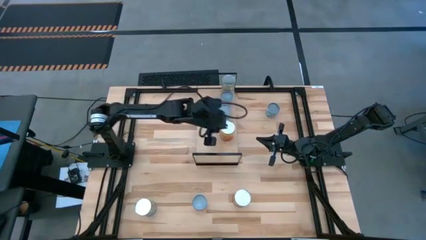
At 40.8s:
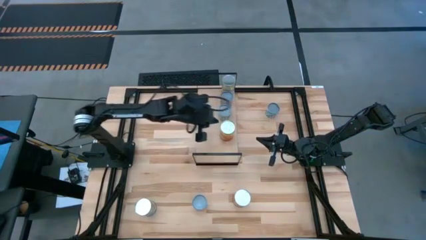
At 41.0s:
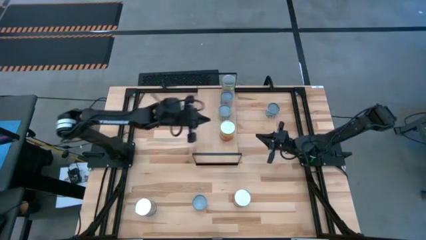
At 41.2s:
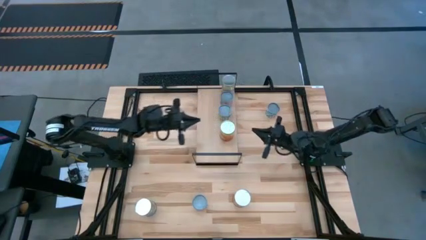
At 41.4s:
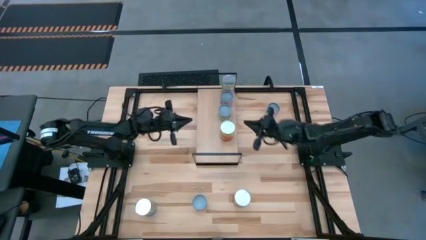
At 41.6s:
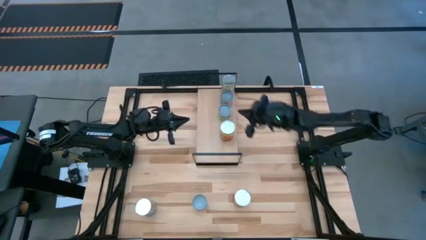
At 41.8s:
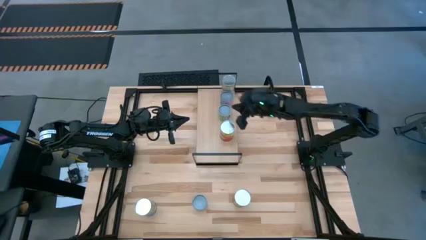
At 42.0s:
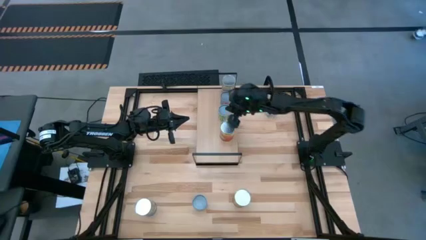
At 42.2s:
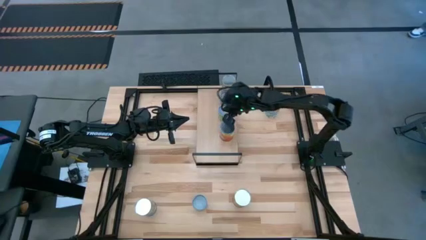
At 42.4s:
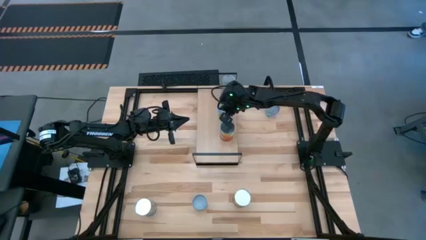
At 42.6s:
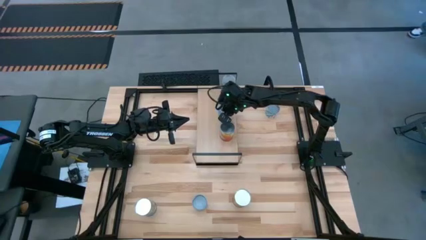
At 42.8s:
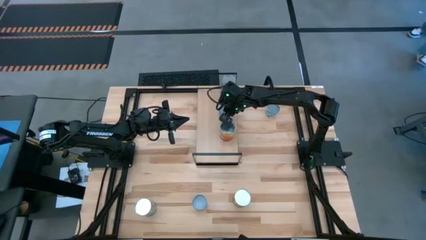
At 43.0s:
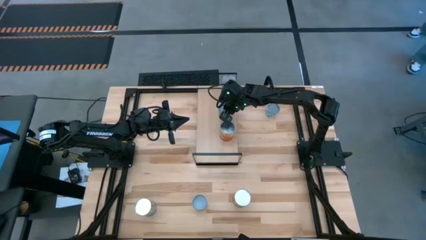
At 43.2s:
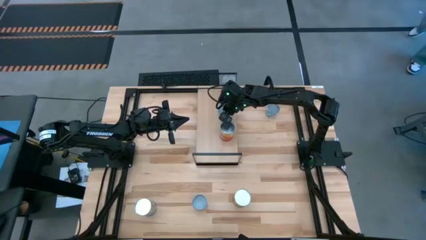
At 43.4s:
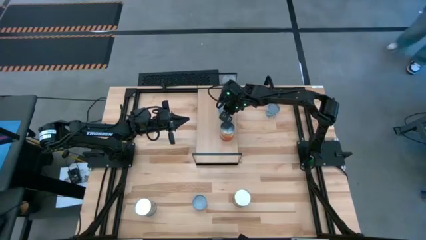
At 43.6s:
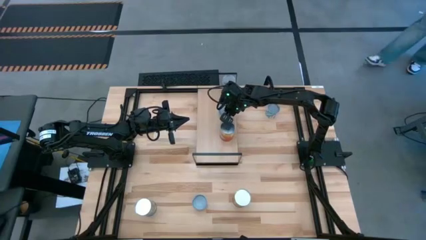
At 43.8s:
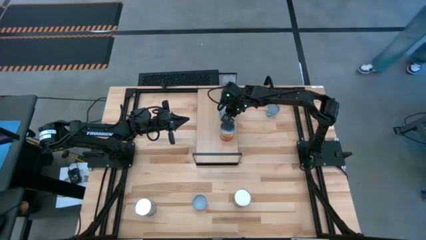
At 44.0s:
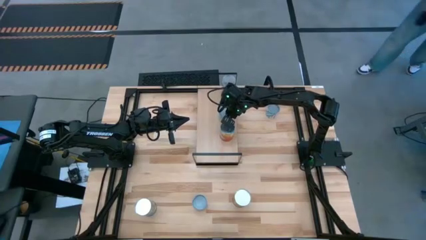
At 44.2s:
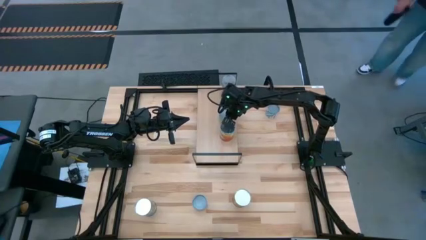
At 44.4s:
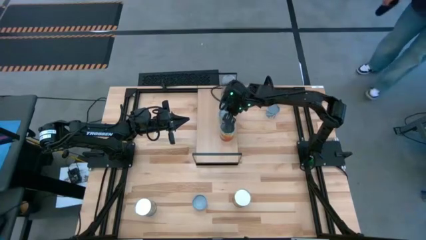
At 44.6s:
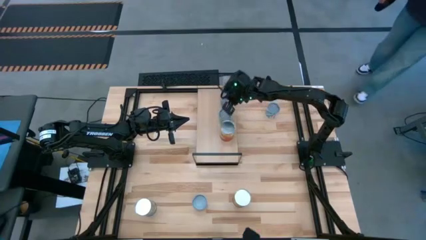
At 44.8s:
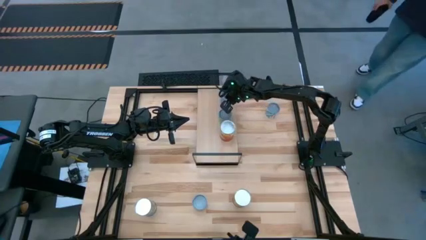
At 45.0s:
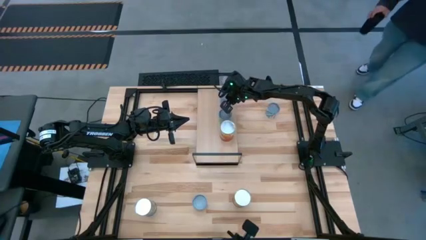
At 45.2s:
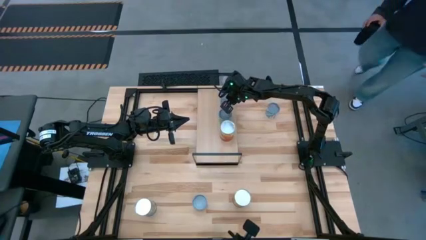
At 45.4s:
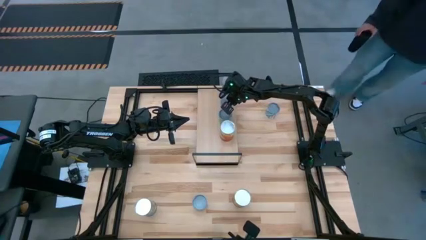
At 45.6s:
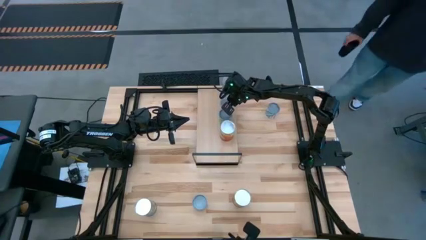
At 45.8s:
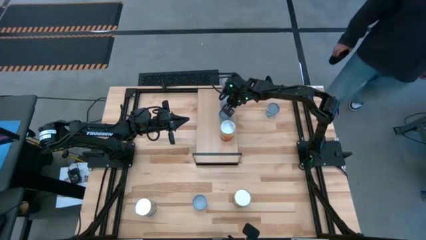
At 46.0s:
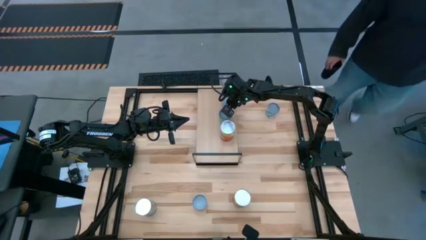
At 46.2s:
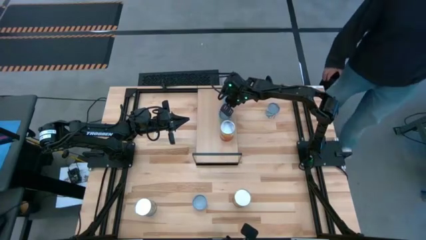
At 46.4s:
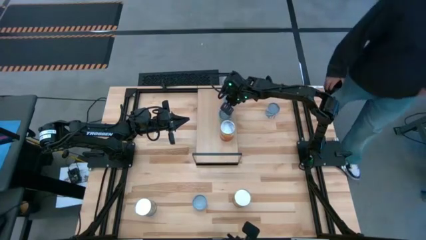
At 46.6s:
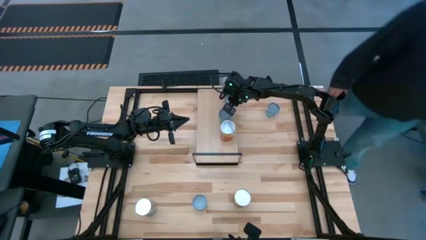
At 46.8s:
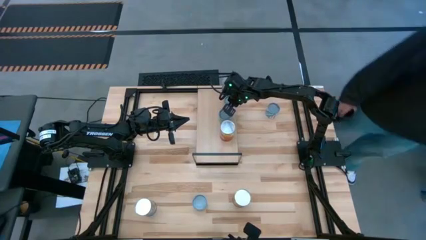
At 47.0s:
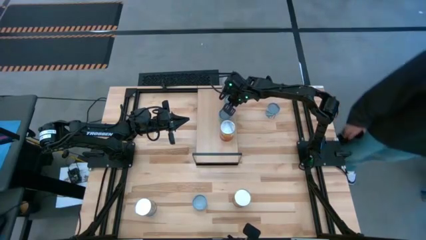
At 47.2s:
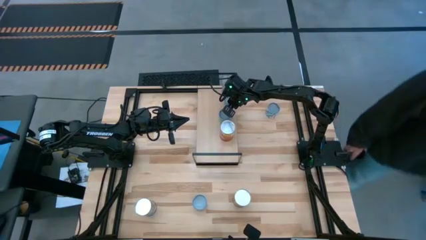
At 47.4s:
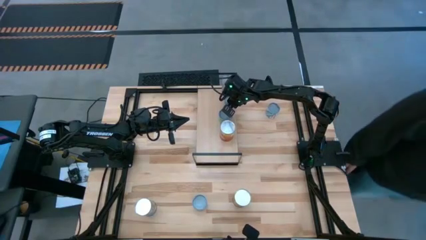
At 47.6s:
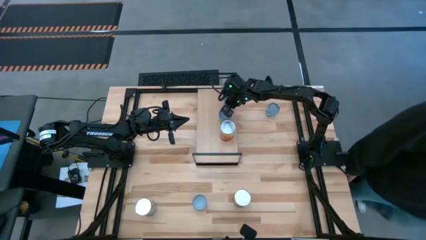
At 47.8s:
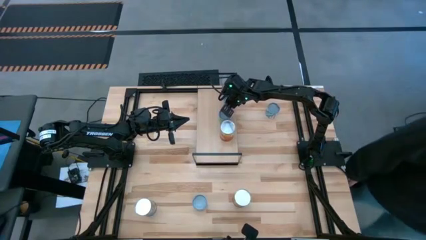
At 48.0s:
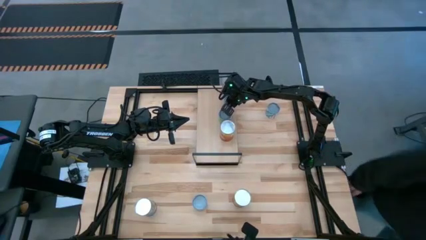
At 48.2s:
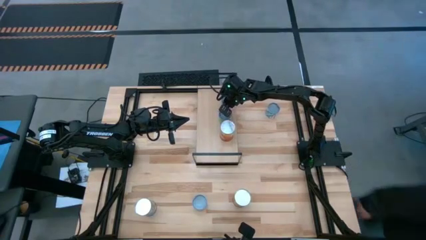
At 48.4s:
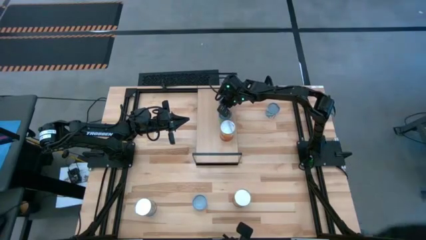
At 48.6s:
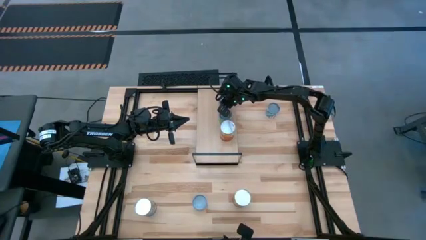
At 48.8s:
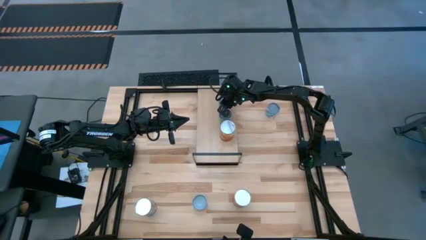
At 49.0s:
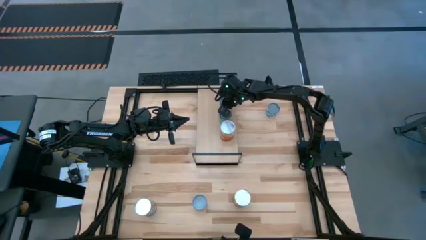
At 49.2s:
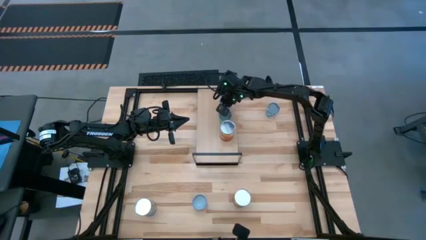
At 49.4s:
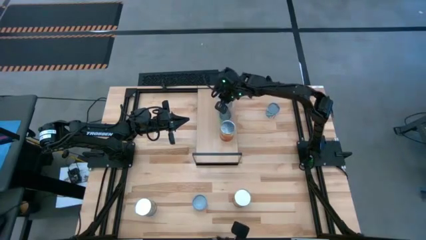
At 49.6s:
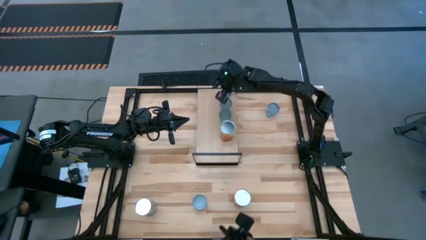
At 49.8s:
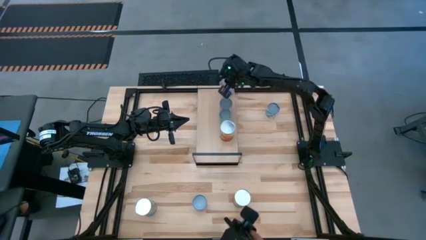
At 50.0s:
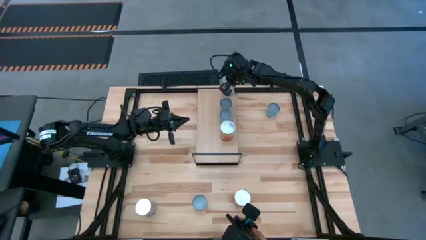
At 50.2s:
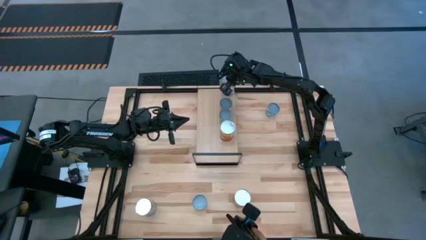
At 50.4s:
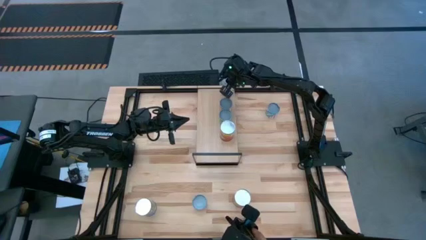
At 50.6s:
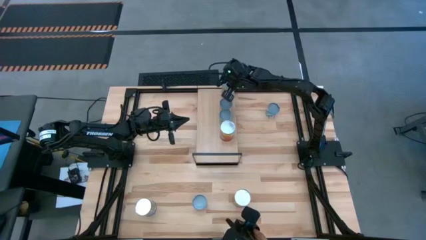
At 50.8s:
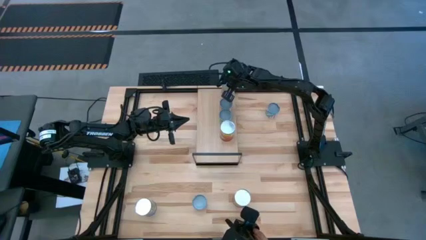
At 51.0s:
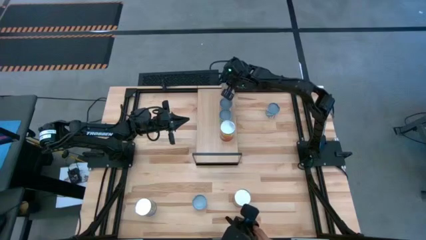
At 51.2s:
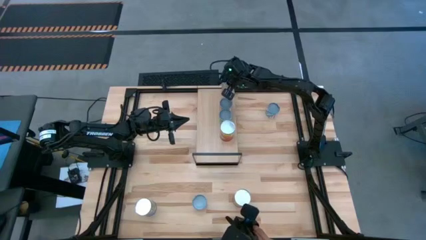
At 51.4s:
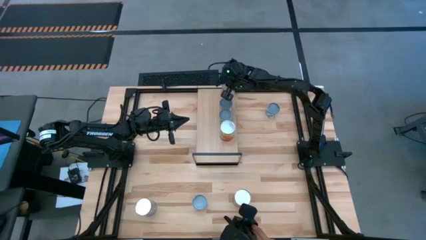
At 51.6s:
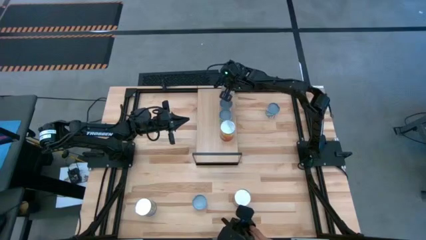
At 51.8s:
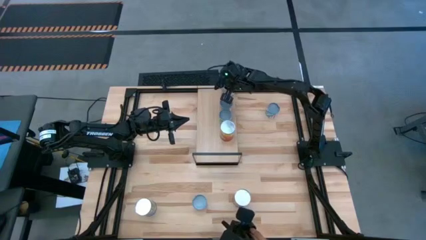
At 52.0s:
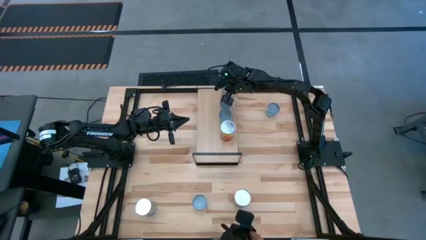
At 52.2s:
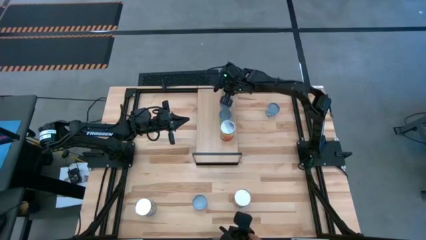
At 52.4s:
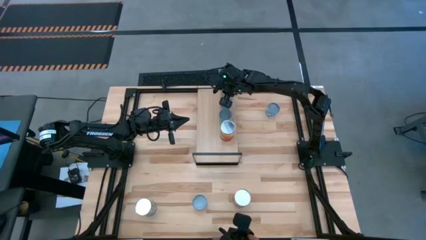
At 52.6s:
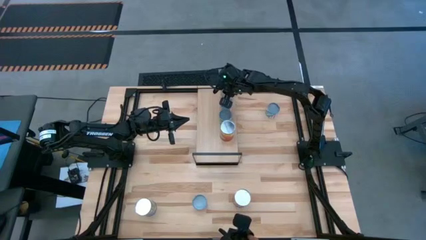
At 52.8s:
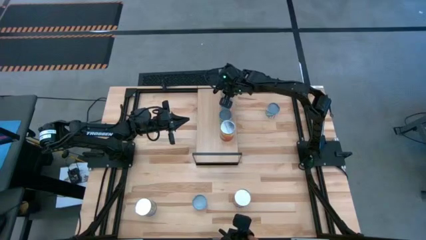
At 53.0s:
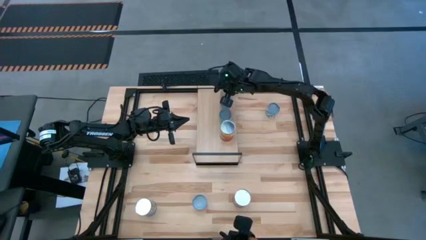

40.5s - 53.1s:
Task: Pick and place cans onto a shelf
Adjust the cans
